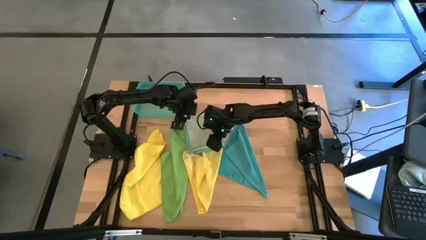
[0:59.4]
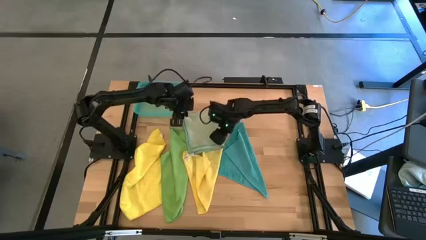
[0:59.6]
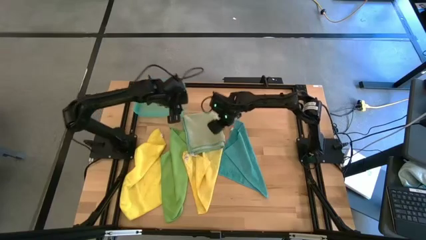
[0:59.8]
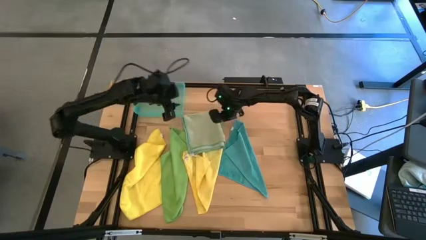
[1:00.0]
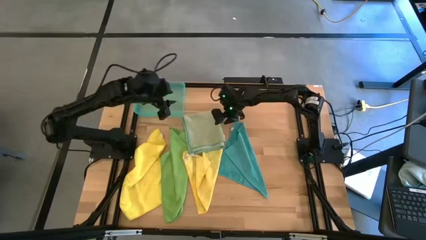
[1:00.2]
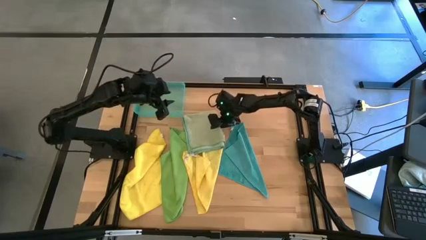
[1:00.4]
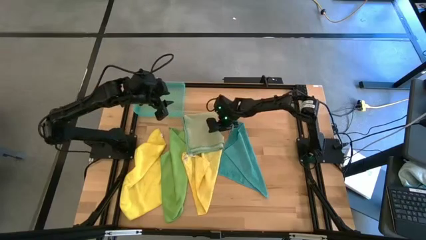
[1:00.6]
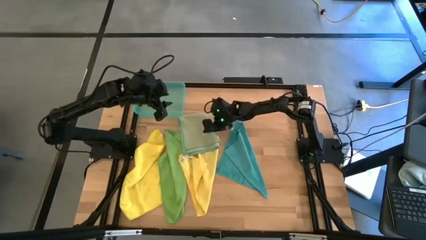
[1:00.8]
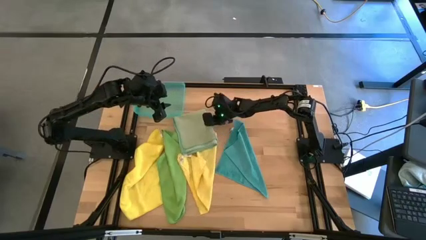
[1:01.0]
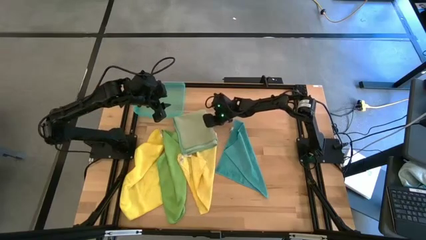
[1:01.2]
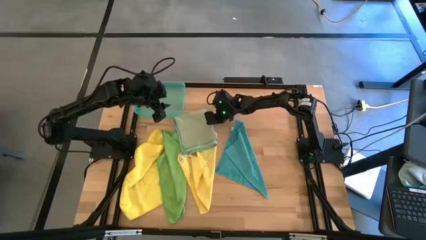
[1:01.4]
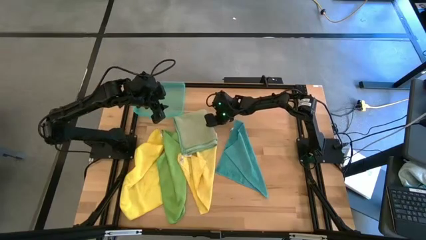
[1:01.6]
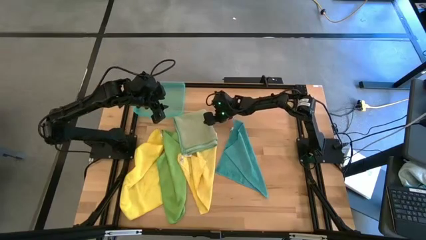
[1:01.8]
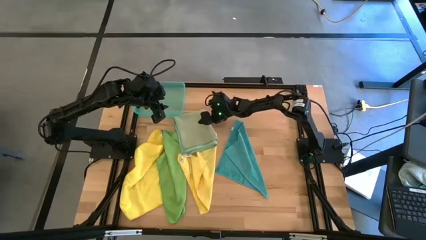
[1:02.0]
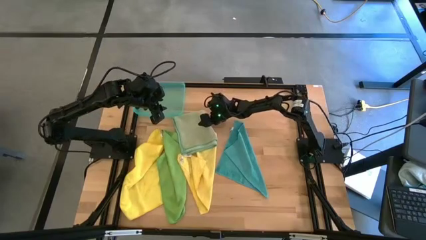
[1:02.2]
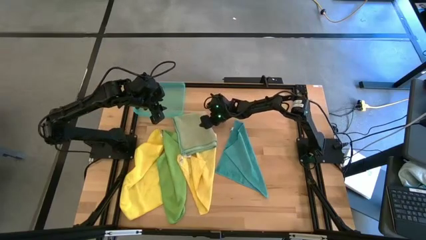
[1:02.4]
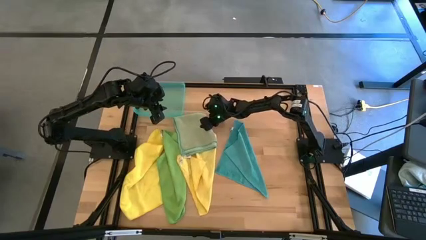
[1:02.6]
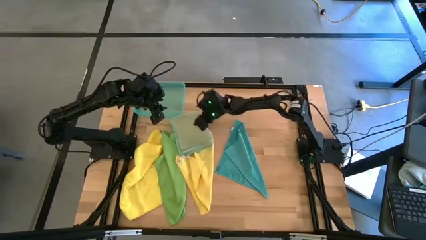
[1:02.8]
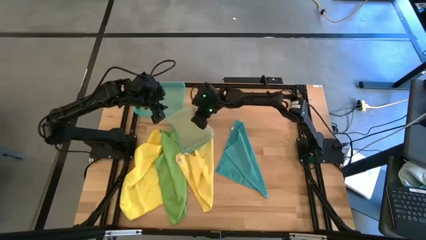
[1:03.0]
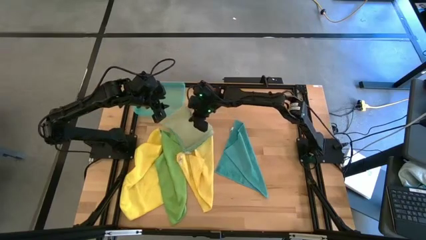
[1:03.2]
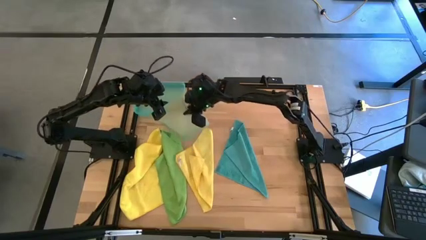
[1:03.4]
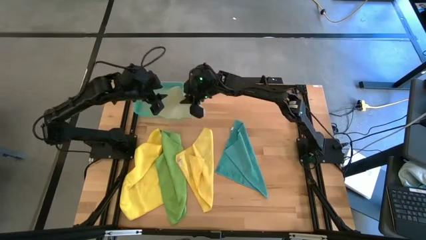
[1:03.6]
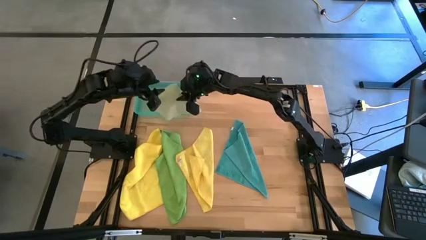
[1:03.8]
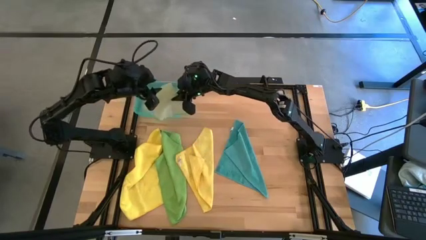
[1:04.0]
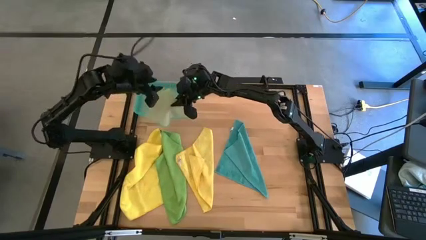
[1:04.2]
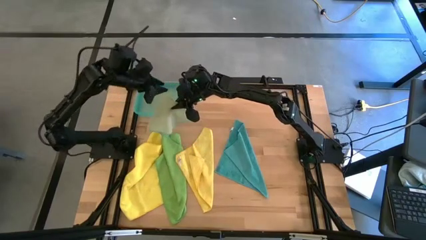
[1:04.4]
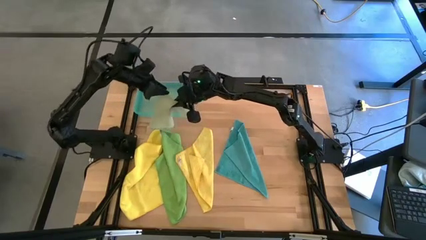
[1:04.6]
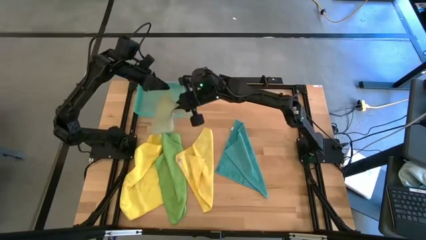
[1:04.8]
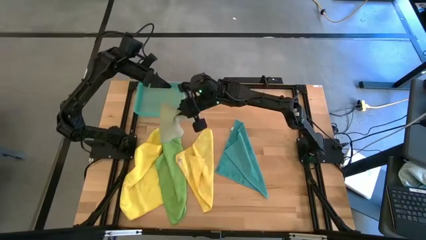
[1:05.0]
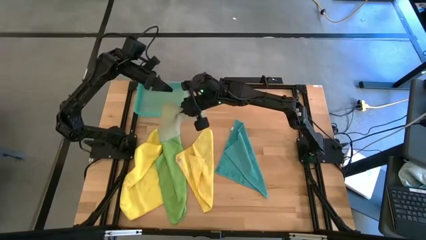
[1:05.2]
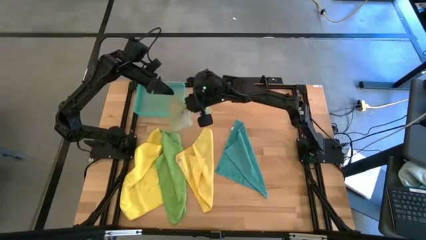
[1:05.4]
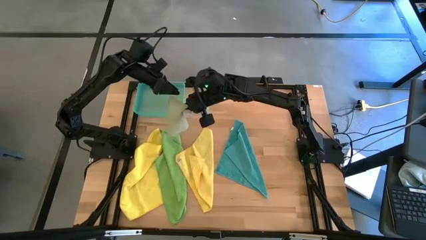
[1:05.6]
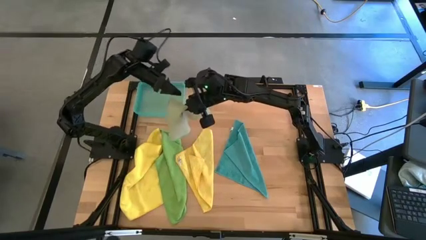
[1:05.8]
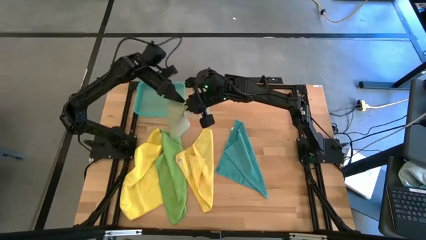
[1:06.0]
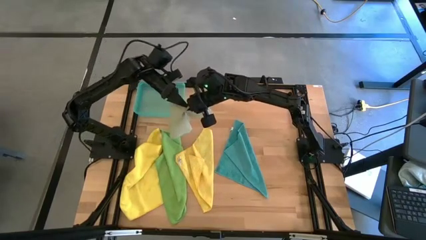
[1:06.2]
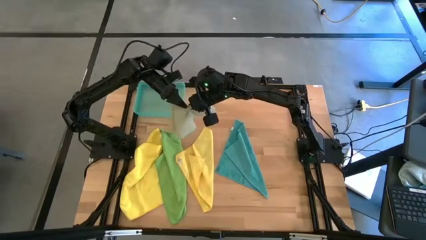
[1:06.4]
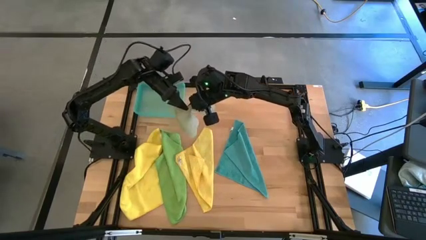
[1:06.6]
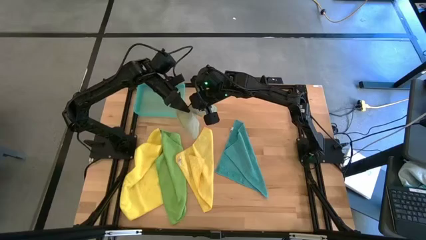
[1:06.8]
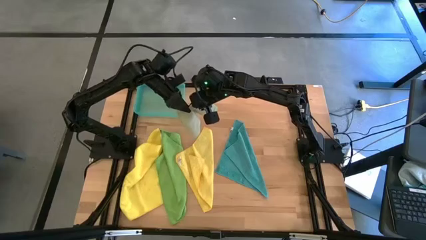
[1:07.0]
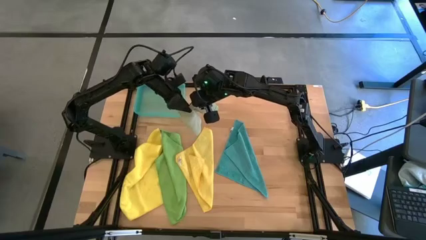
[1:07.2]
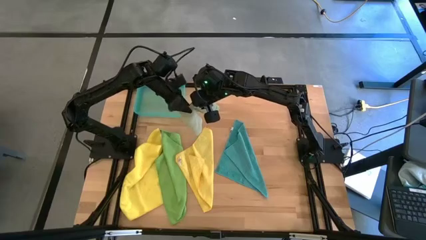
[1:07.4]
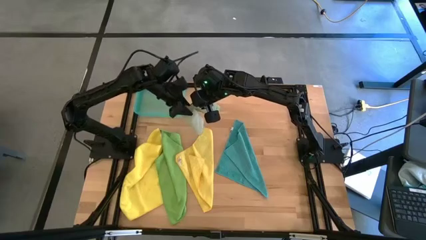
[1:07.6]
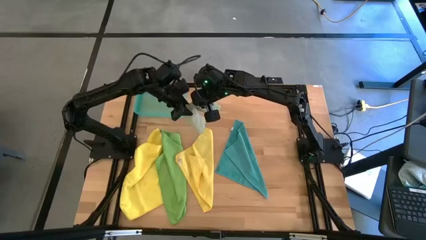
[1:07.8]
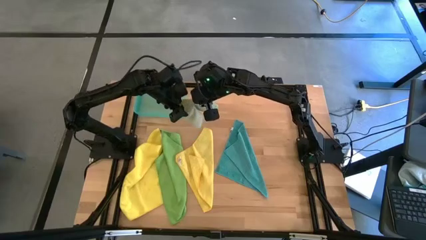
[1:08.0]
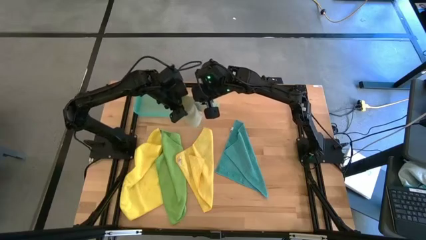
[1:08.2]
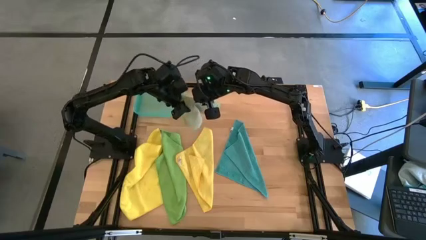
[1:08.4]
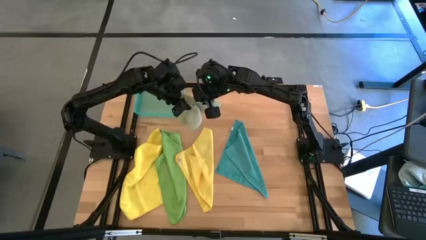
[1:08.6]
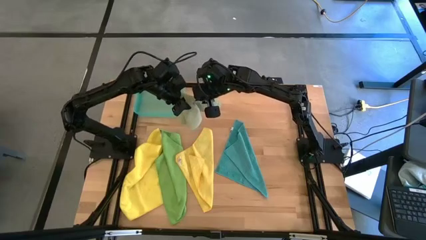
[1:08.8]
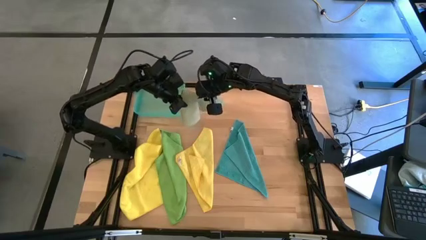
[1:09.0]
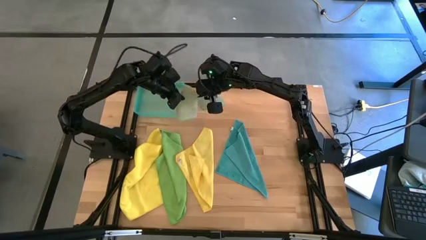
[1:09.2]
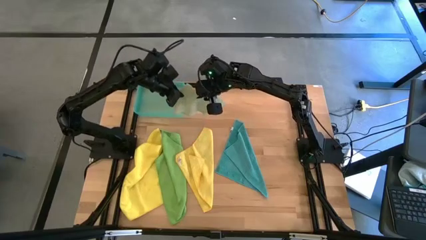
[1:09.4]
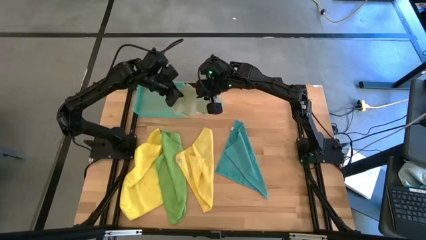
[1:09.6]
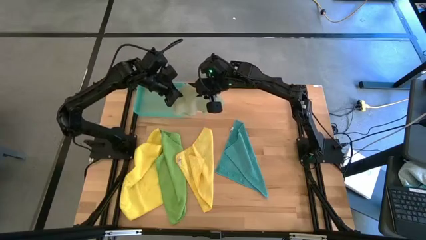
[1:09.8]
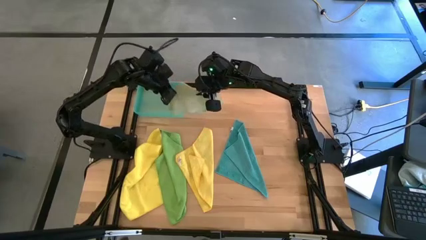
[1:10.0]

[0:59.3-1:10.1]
Task: Fold microfiber towels
Put the light green microfiber cloth into the blue bin

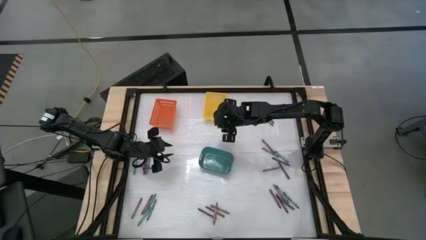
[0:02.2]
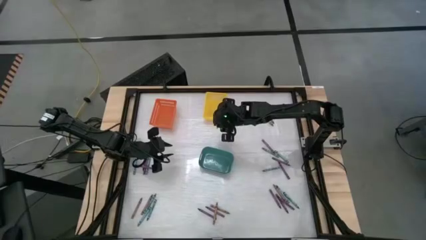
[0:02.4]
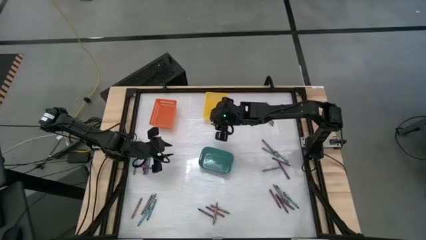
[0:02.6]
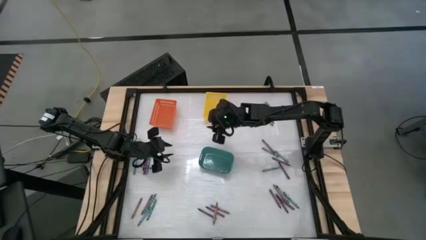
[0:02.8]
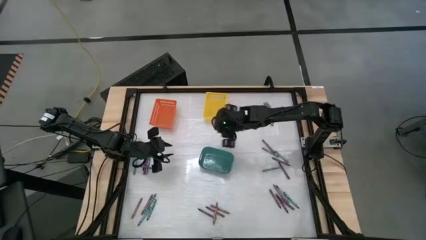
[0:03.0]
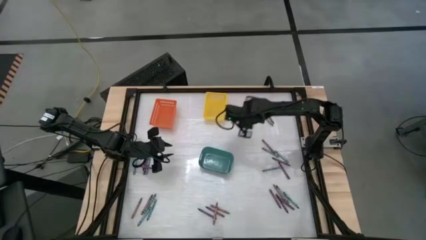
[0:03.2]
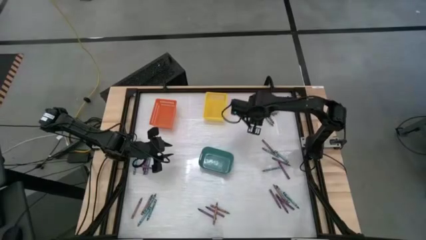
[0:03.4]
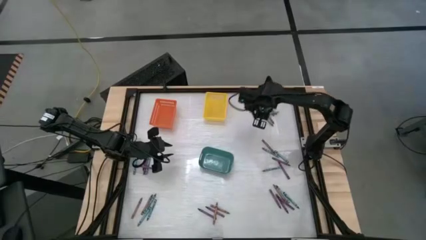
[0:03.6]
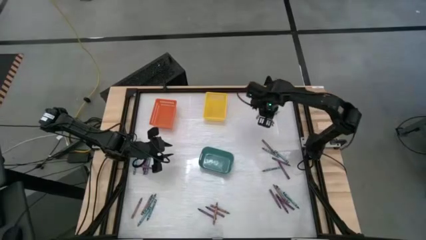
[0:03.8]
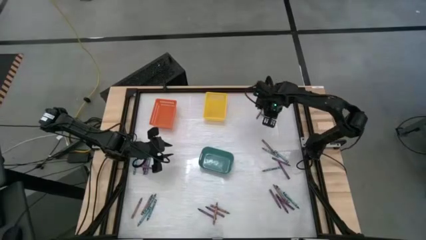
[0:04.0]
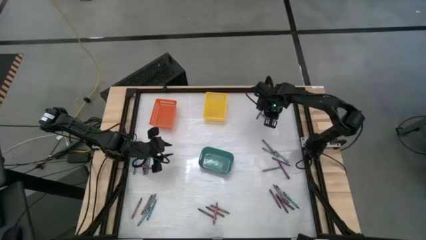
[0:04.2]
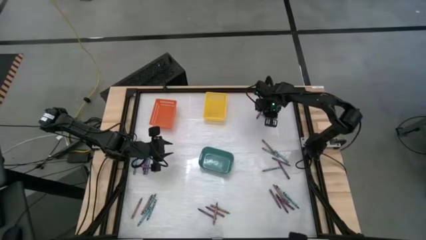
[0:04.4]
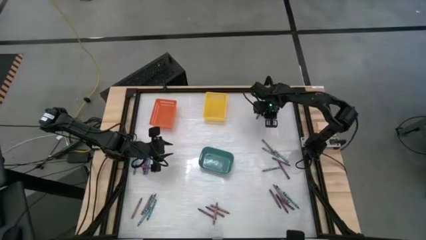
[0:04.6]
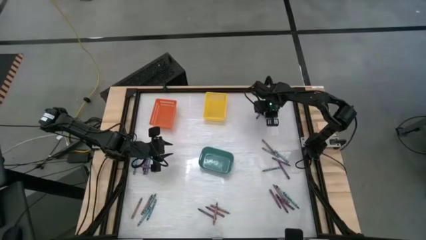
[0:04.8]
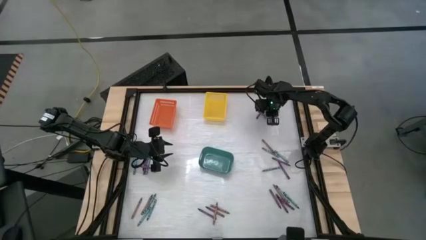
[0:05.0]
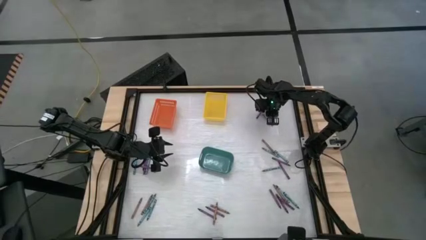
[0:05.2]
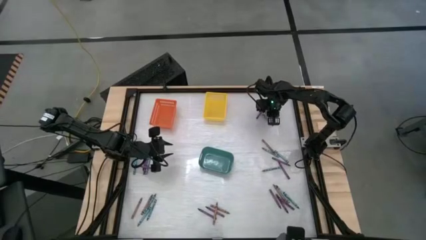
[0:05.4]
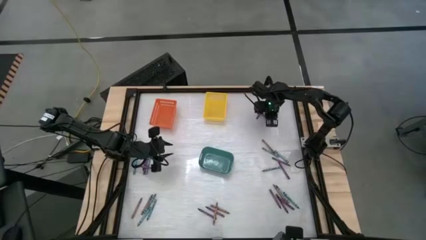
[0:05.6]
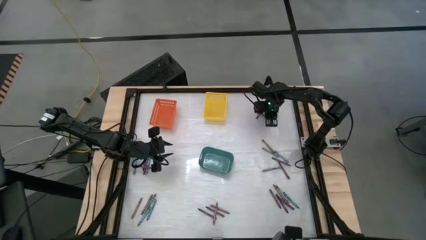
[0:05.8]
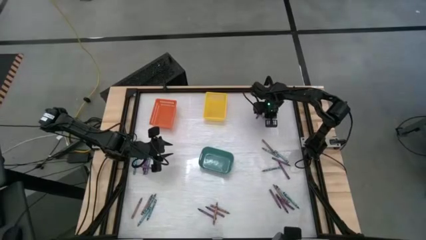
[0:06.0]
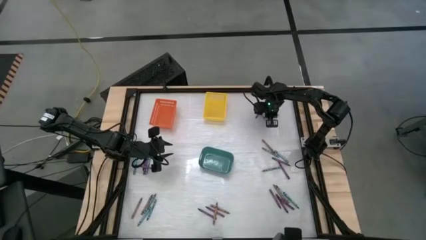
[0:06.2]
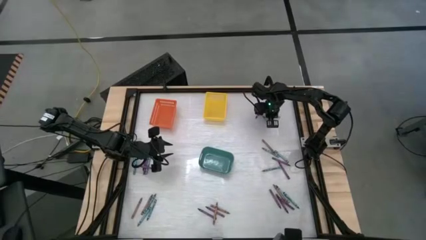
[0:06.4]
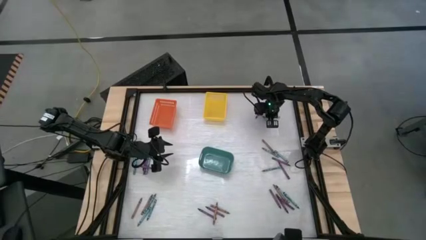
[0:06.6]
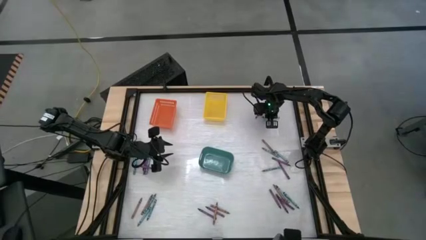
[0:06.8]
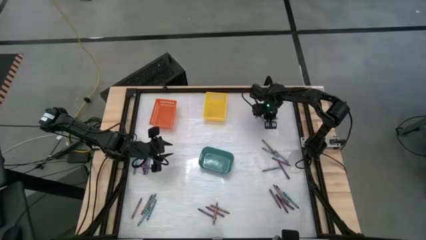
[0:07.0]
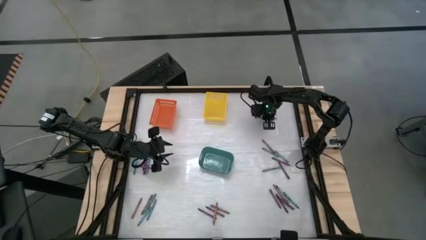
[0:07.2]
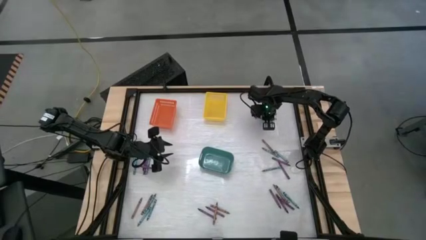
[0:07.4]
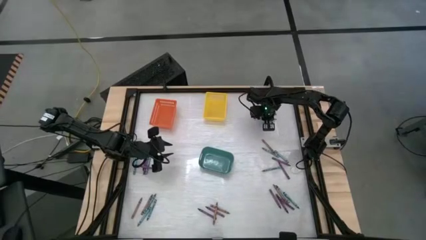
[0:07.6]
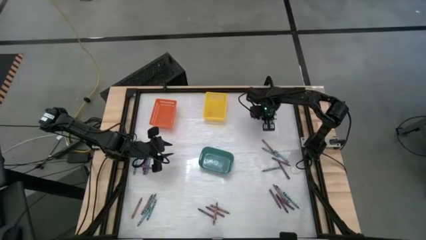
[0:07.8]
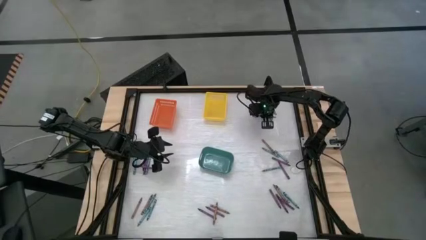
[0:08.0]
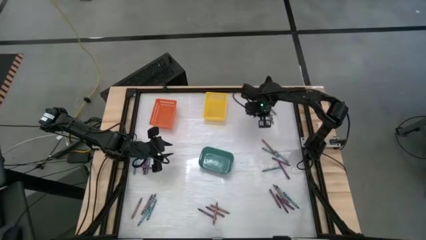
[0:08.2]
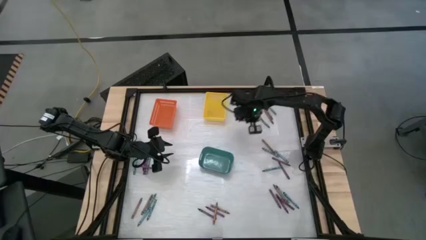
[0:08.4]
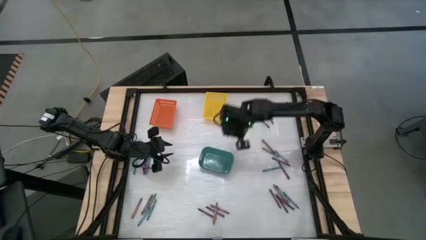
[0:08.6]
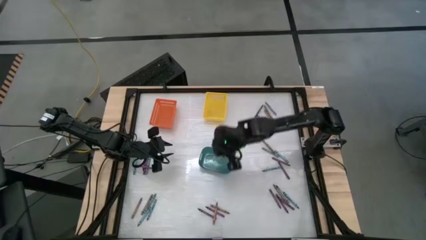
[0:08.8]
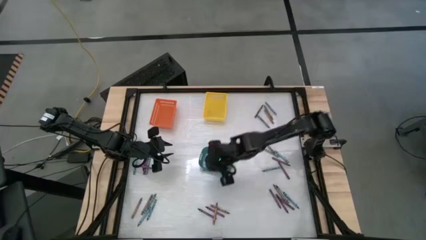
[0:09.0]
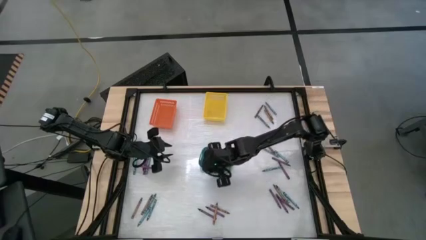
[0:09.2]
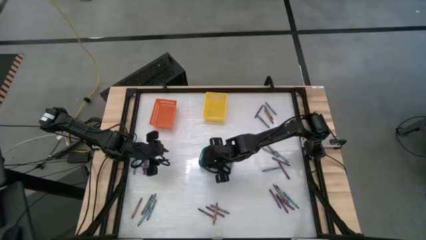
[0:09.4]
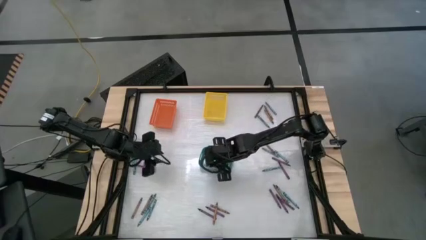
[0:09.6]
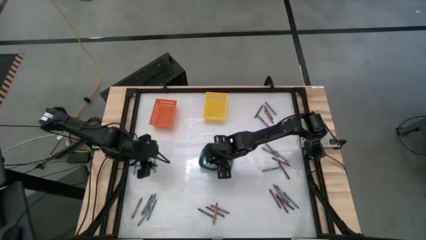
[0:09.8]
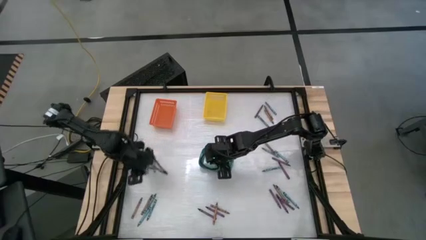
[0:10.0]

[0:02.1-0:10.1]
Task: Sort crayons
Put the blue crayon into the blue bin
